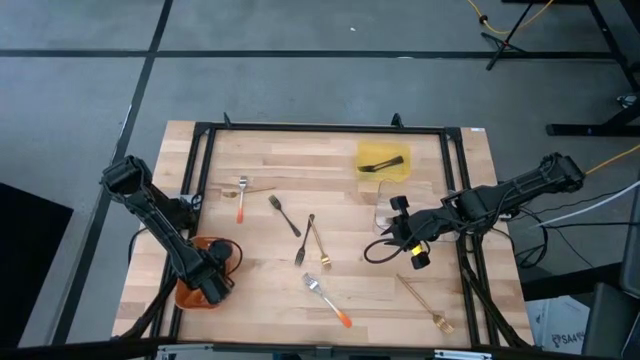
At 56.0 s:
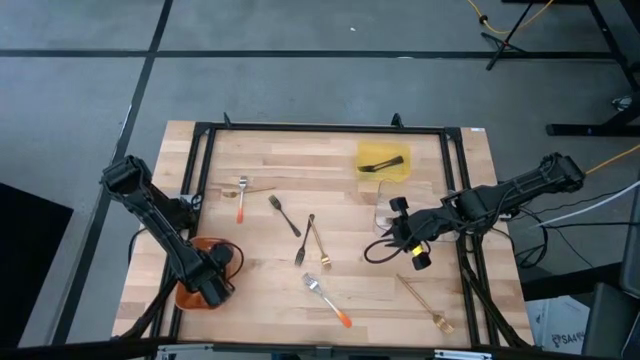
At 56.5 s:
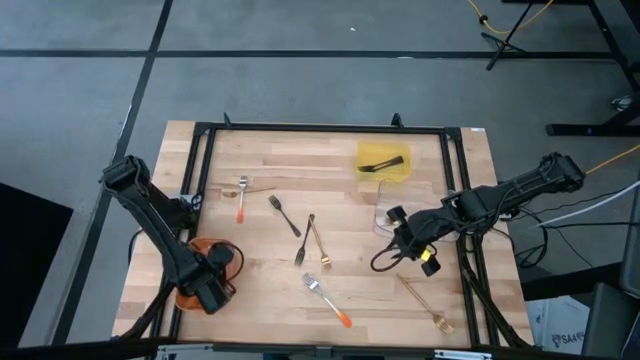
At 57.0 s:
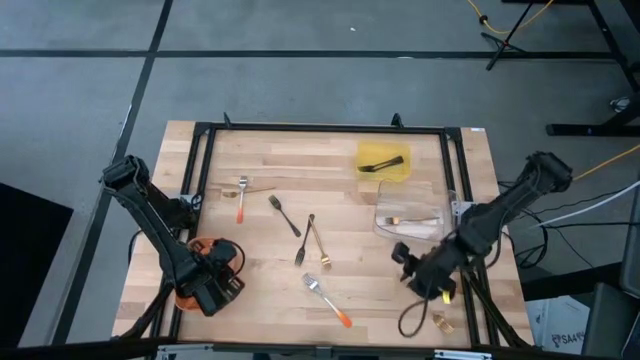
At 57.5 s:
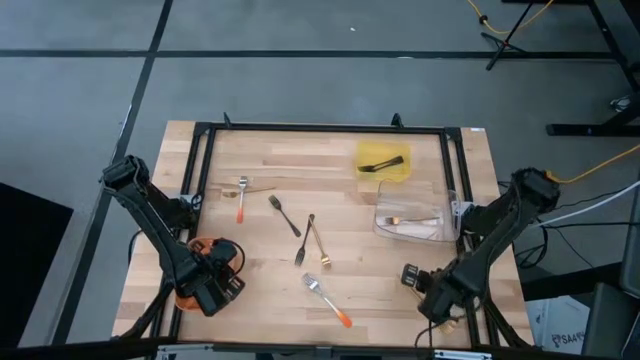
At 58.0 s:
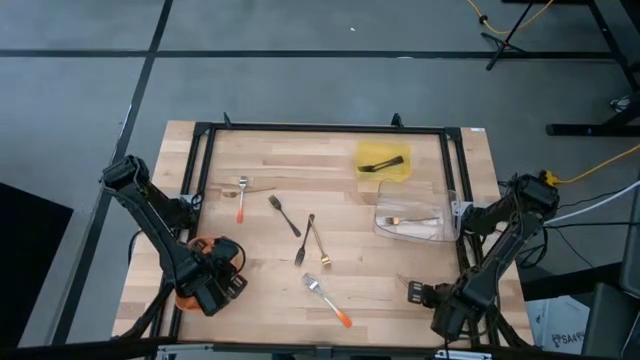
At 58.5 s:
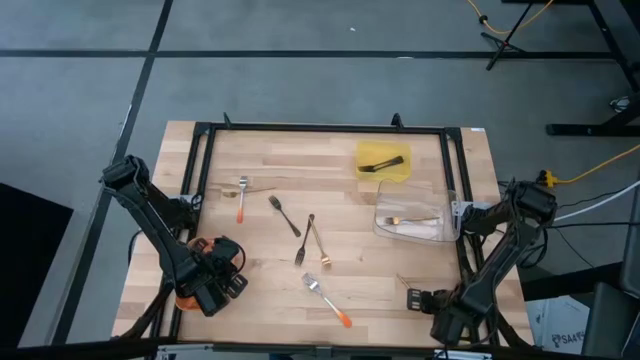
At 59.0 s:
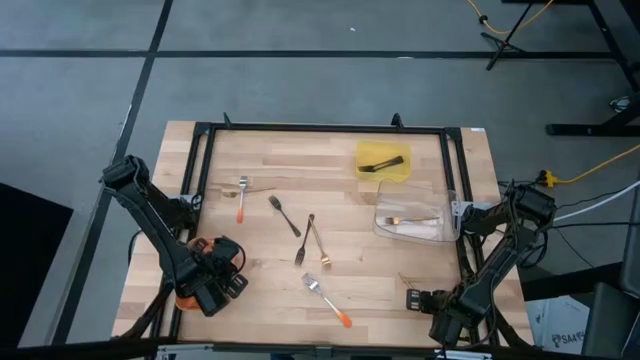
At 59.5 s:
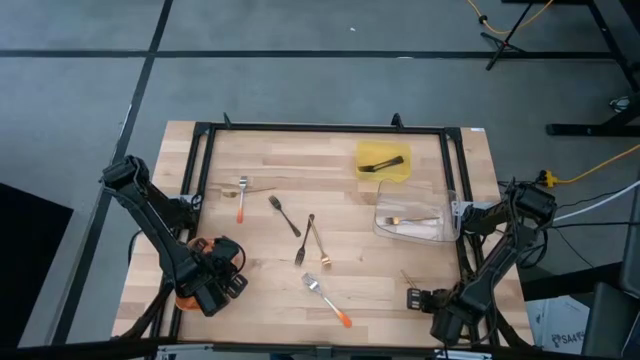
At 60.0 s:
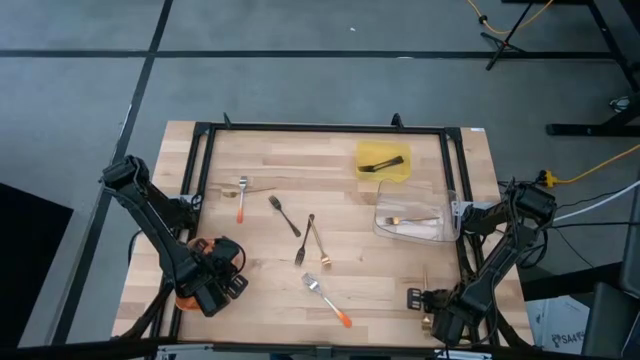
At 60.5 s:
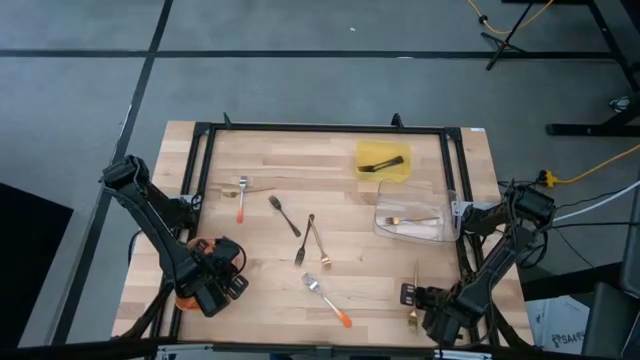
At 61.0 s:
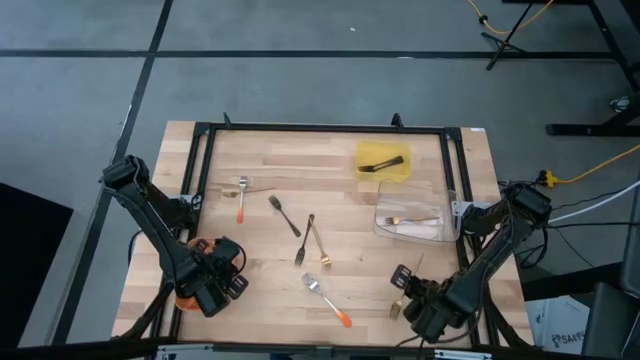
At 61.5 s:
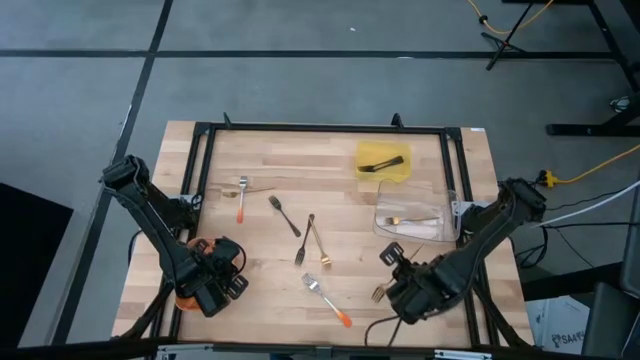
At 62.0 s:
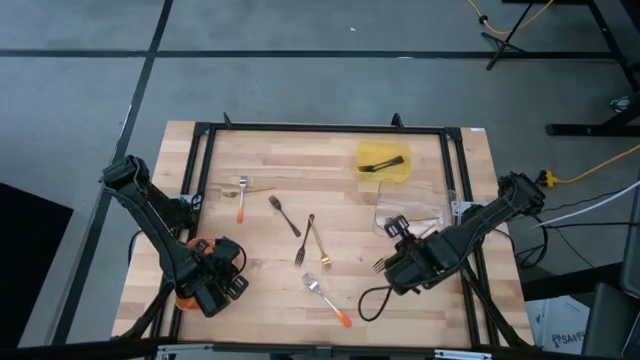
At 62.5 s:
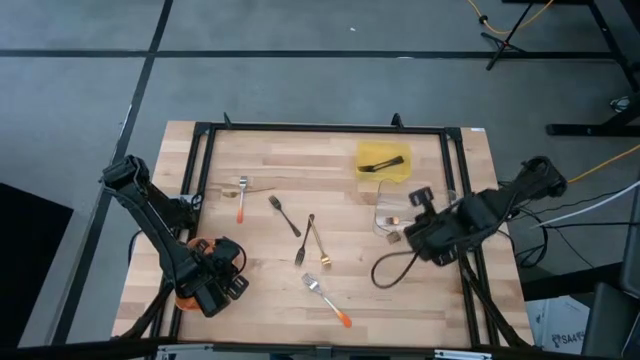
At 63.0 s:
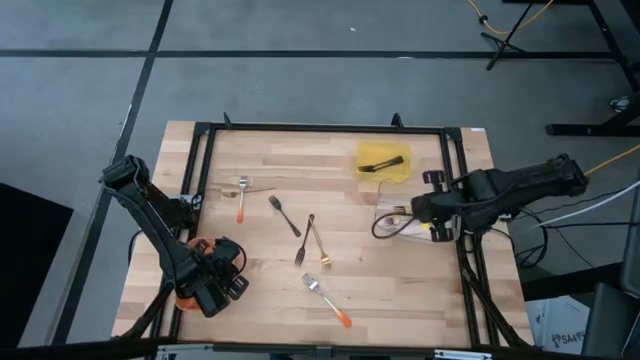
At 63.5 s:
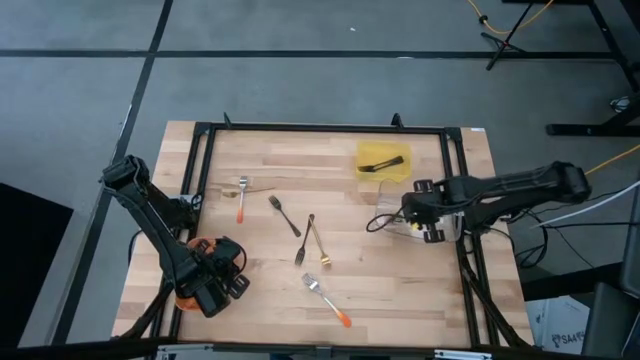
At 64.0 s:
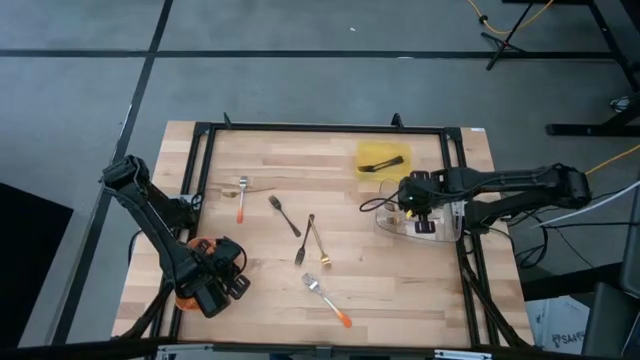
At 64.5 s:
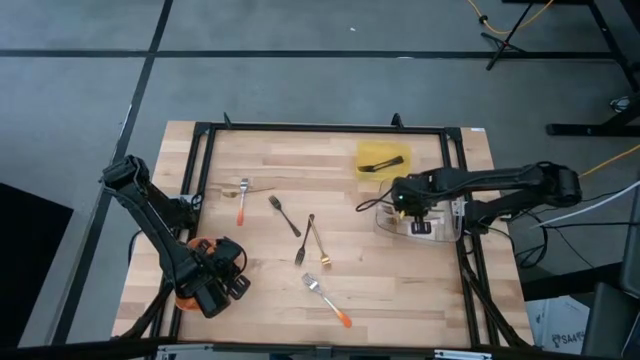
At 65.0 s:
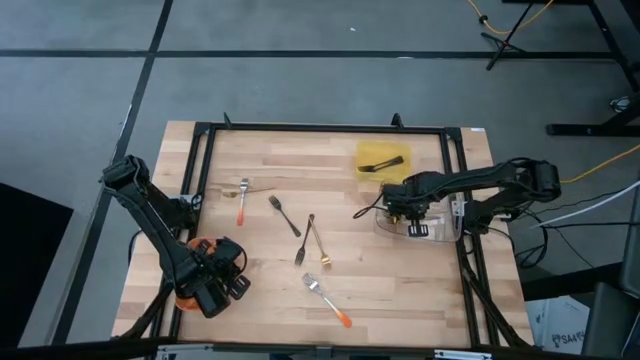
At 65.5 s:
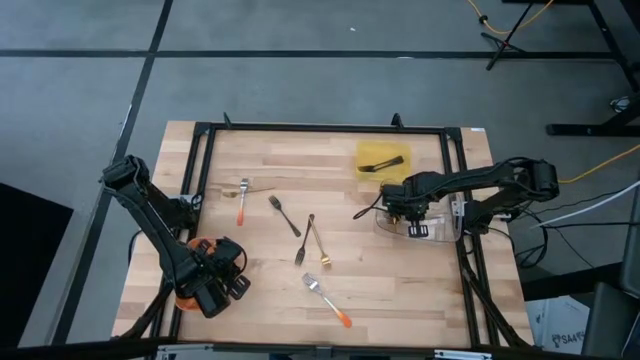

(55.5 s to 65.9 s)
Task: Sort silverware by color (type)
Put the gold fork into the transparent bin

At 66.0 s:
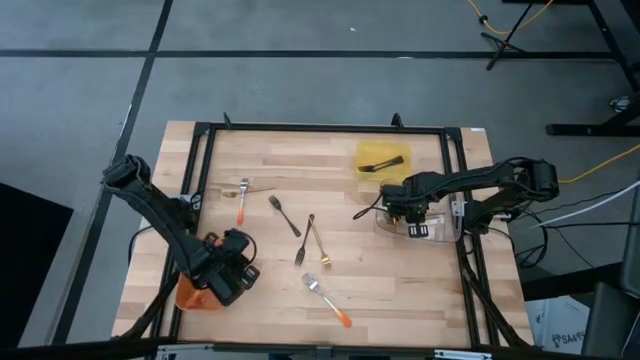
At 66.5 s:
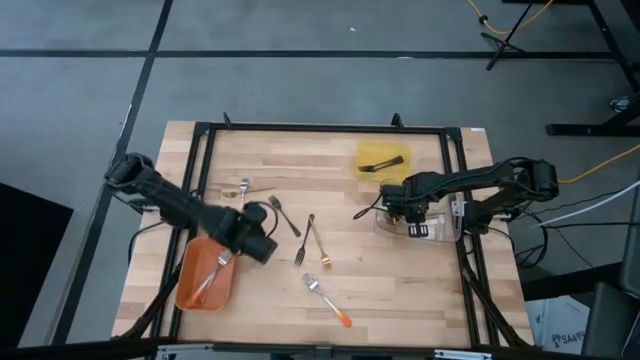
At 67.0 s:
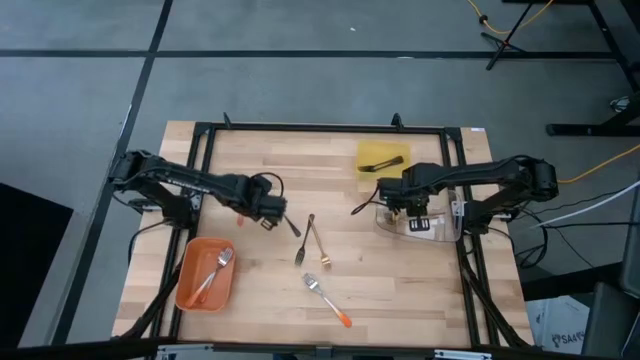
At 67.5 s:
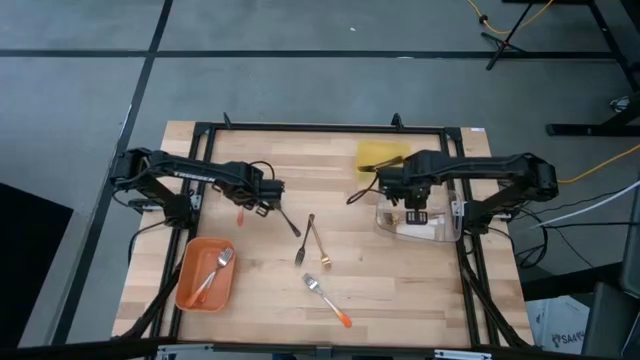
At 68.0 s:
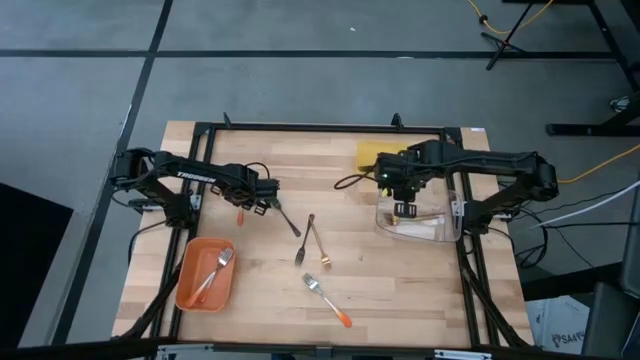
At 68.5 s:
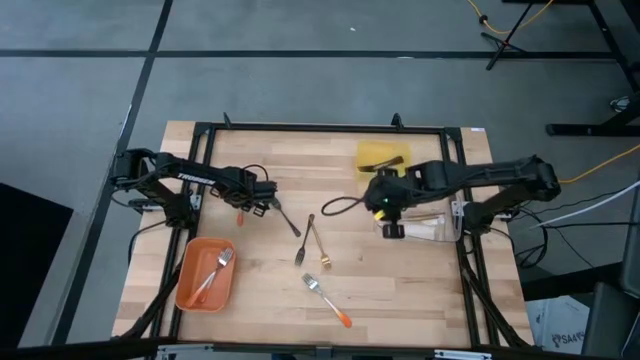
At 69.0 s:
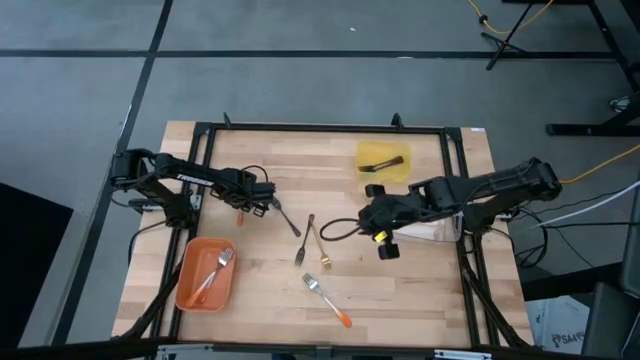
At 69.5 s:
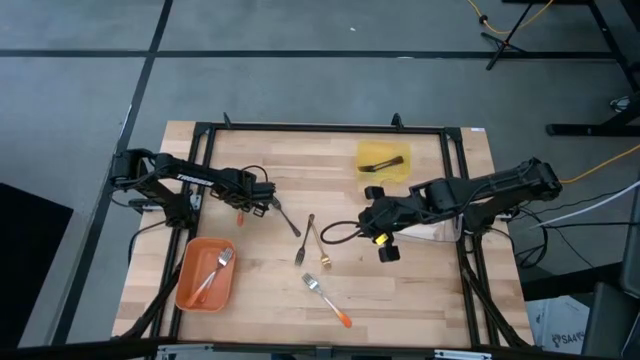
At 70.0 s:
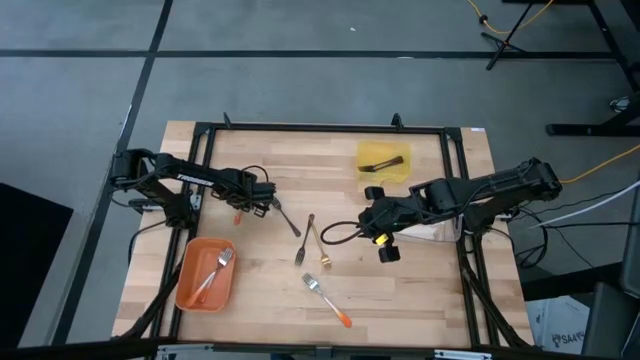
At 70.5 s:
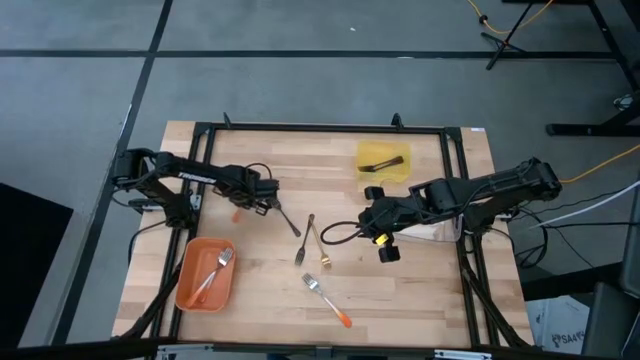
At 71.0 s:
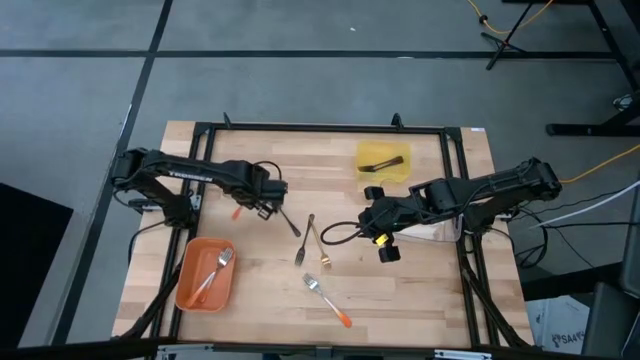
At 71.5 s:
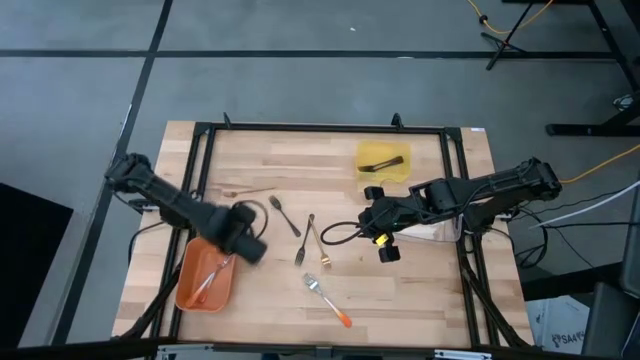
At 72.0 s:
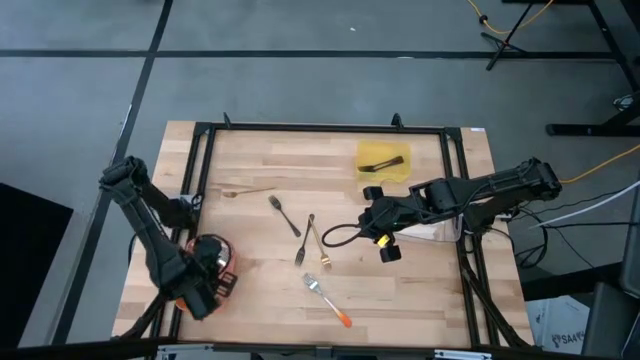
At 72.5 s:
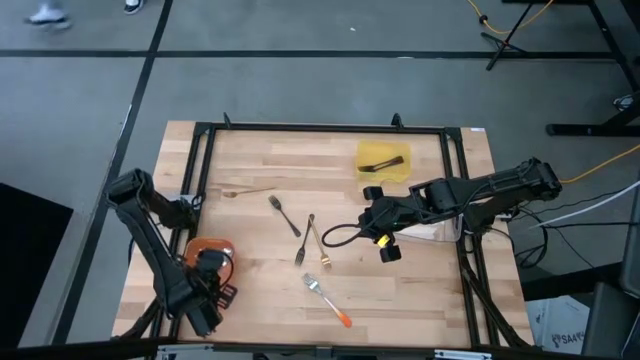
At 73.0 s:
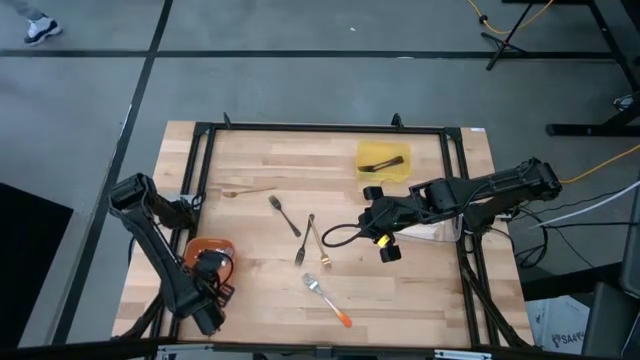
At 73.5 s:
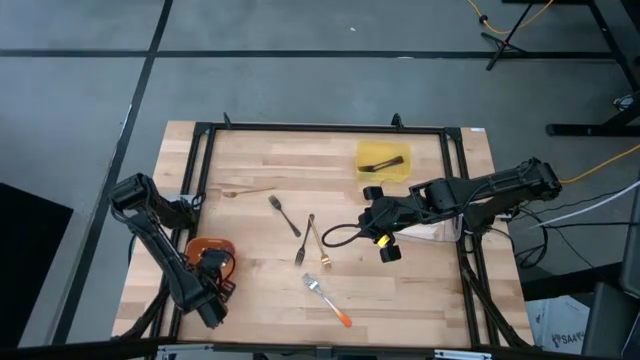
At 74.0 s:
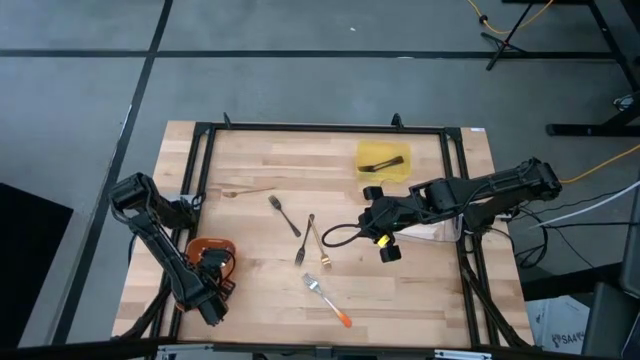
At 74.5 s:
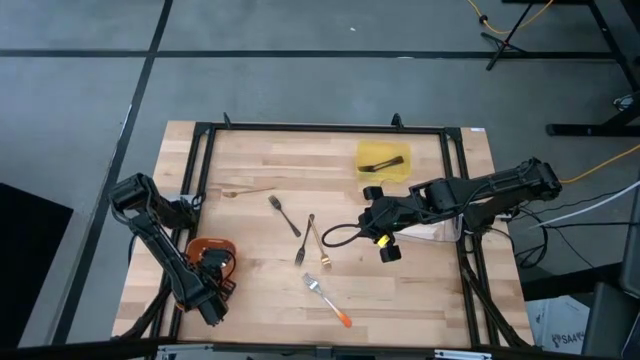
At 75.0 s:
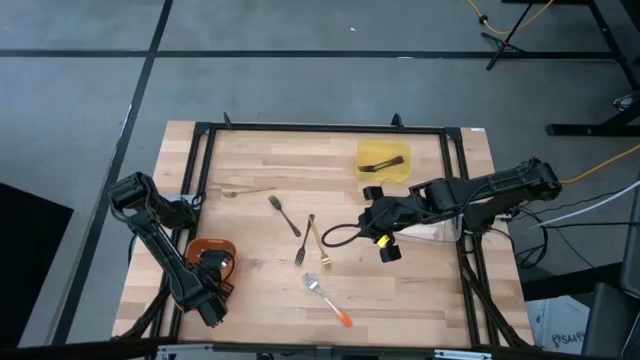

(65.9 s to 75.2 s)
Put the orange fork into the orange bin

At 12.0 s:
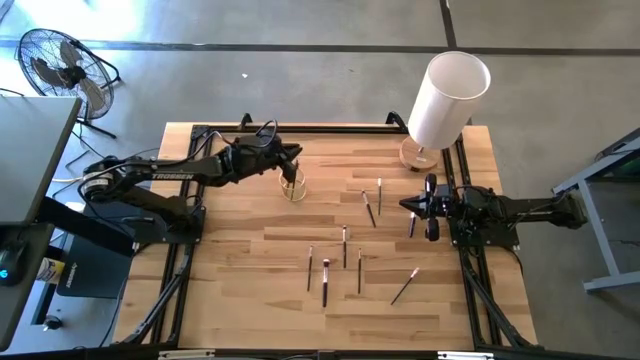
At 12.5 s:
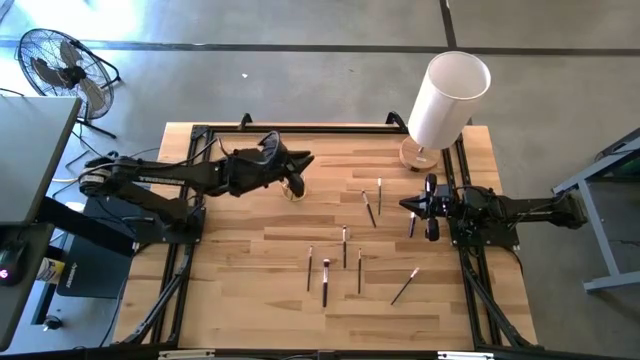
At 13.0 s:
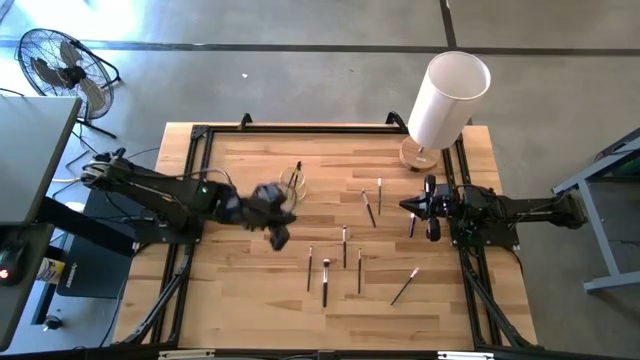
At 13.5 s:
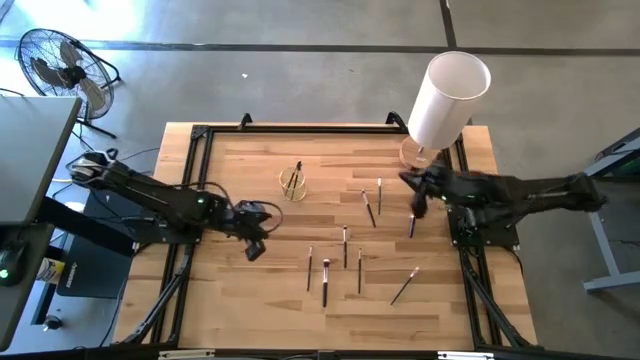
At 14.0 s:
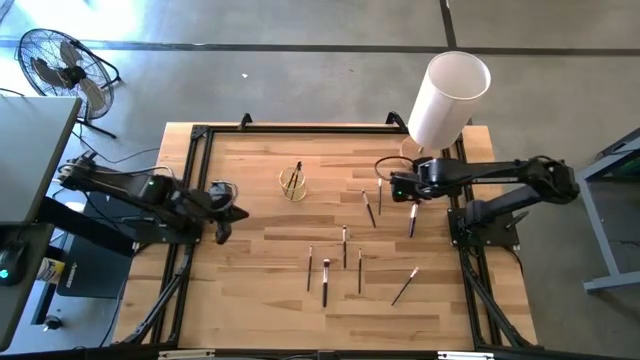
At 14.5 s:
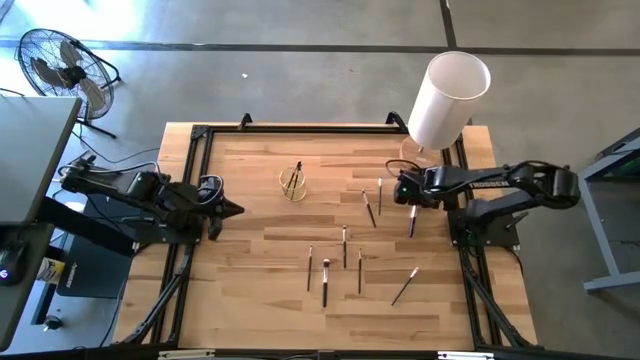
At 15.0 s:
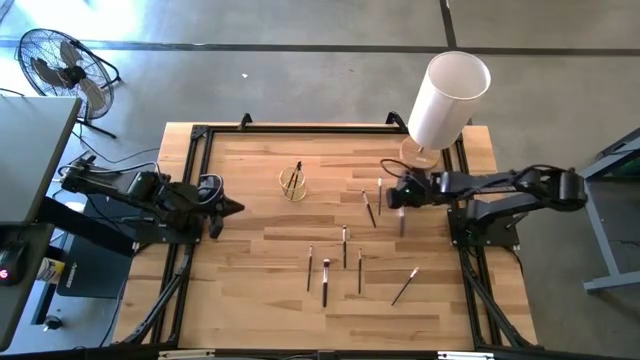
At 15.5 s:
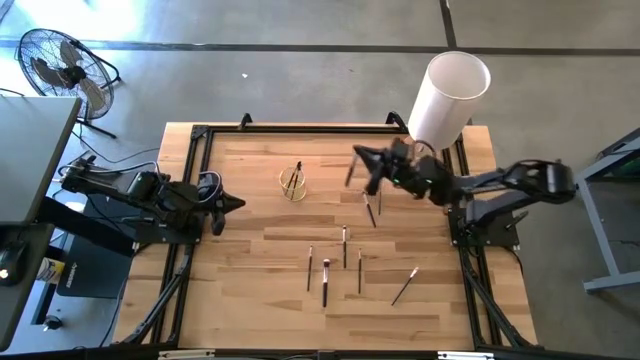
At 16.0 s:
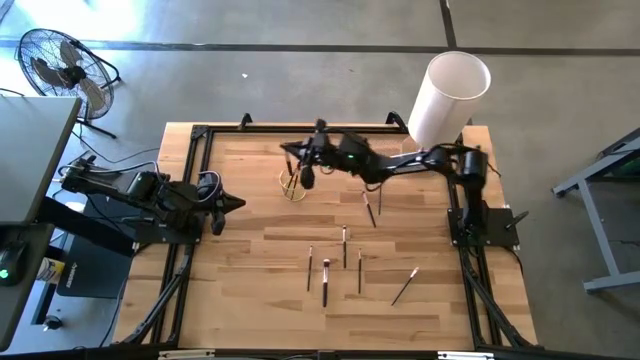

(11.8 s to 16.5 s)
Task: Put items in baskets/containers
Put the makeup brush into the wire organizer
